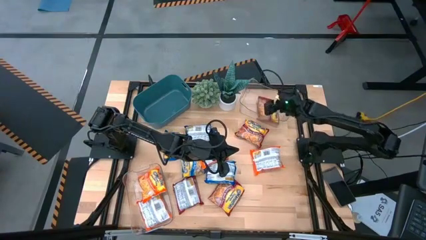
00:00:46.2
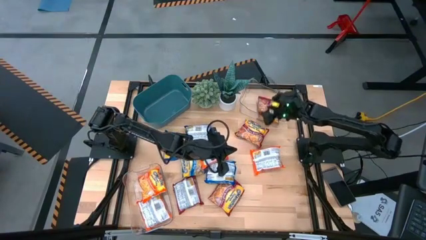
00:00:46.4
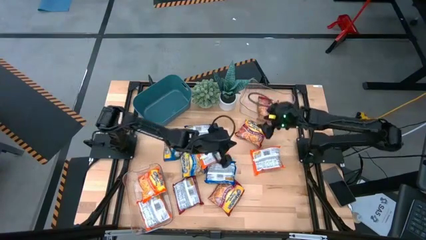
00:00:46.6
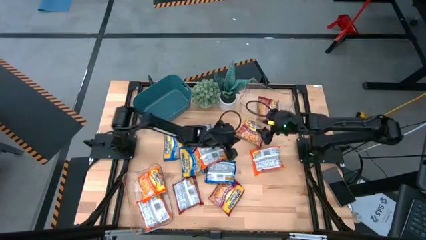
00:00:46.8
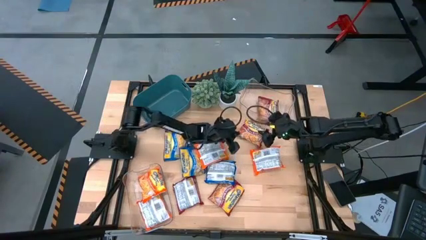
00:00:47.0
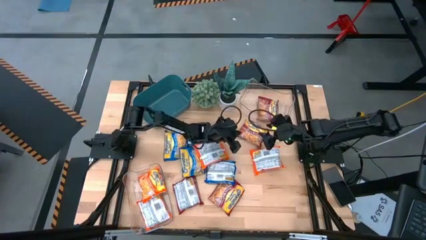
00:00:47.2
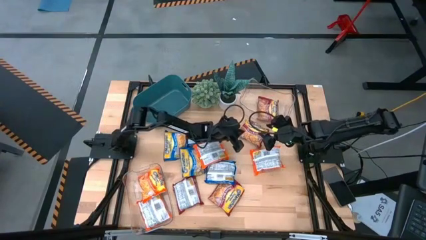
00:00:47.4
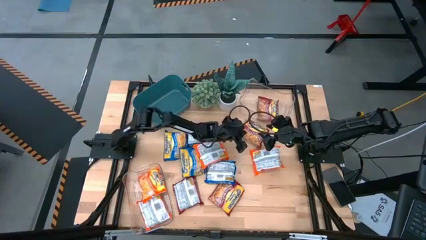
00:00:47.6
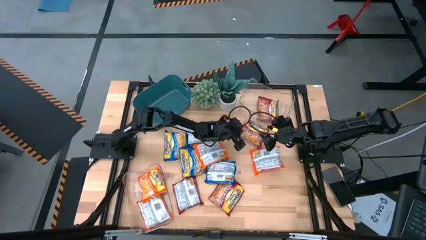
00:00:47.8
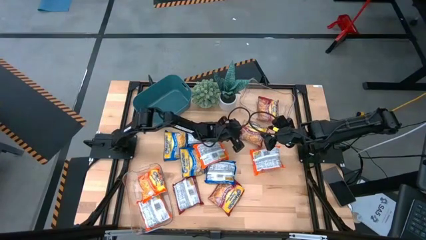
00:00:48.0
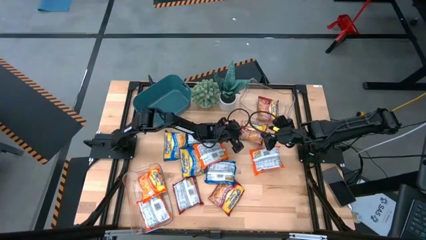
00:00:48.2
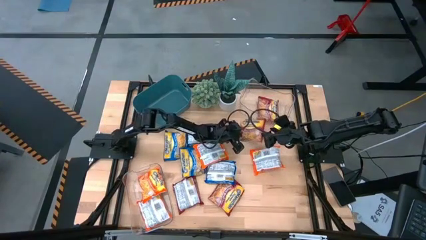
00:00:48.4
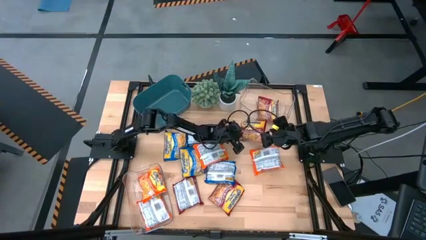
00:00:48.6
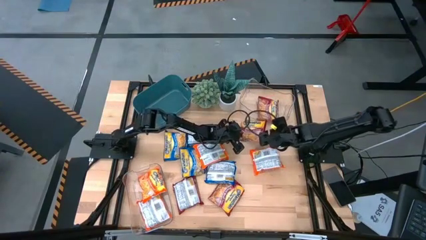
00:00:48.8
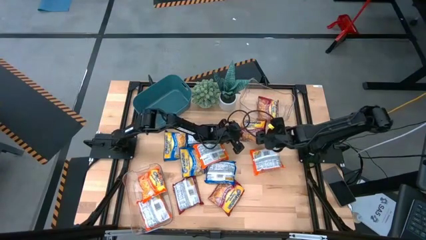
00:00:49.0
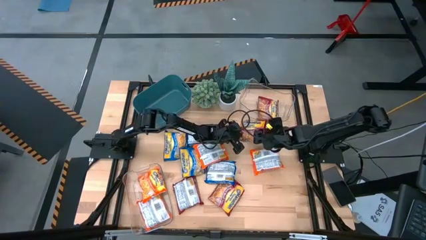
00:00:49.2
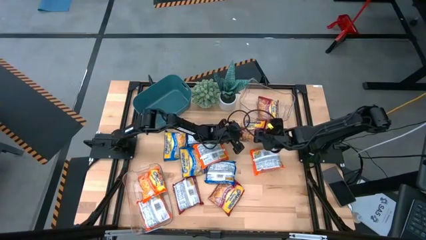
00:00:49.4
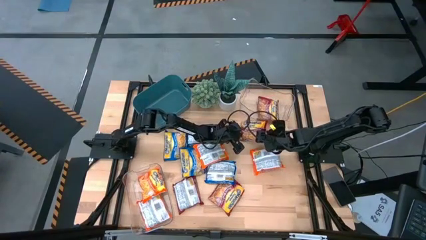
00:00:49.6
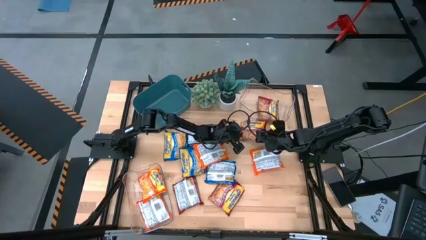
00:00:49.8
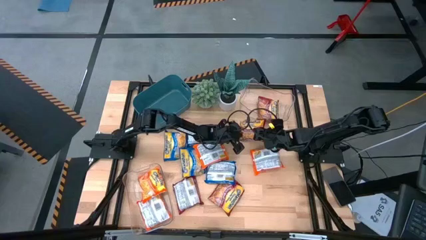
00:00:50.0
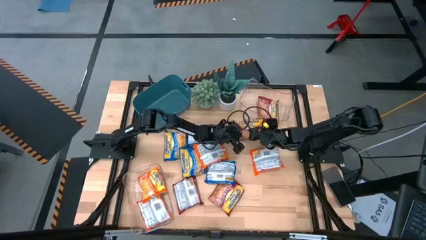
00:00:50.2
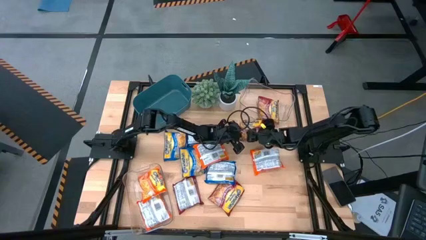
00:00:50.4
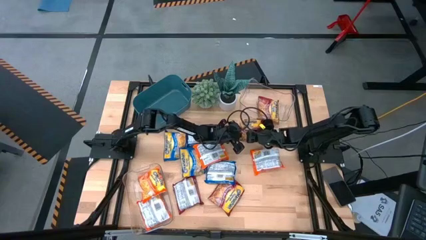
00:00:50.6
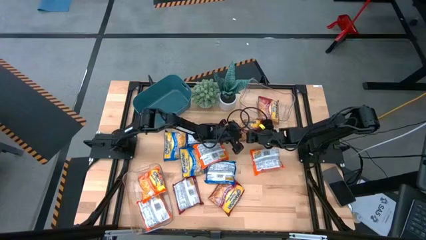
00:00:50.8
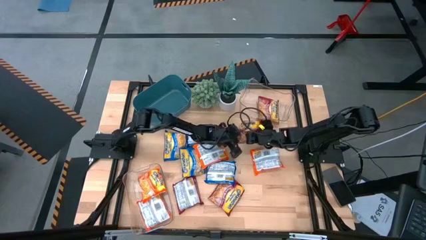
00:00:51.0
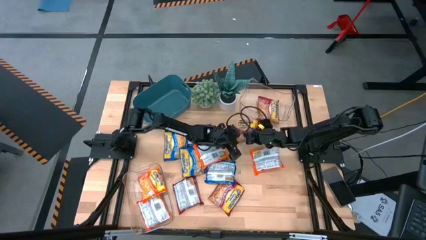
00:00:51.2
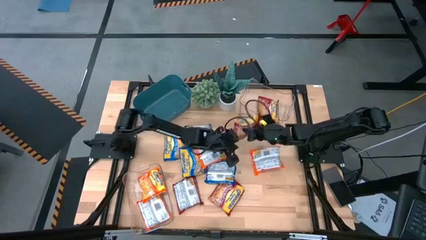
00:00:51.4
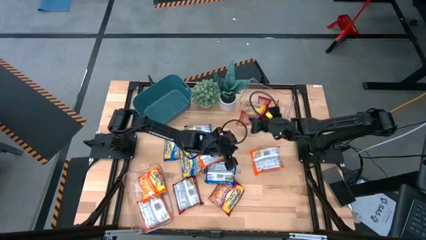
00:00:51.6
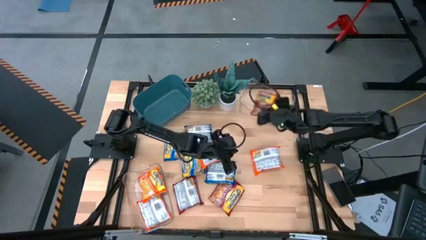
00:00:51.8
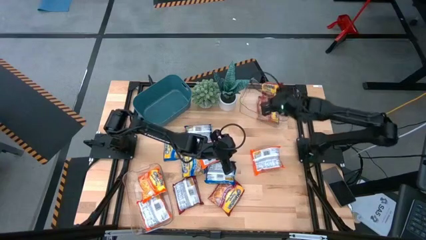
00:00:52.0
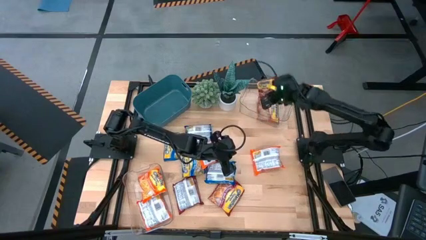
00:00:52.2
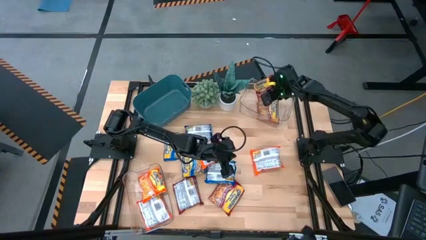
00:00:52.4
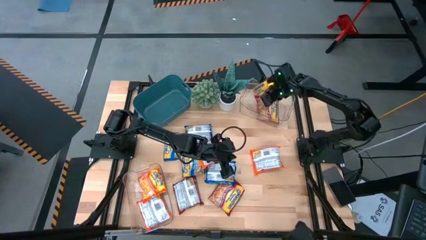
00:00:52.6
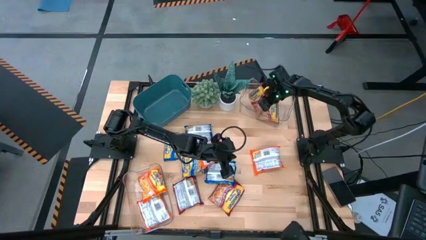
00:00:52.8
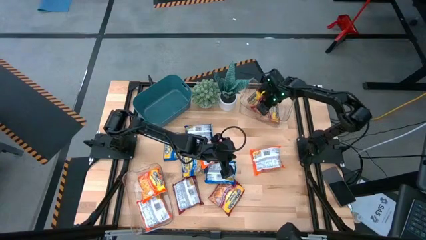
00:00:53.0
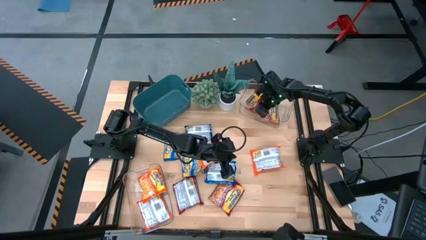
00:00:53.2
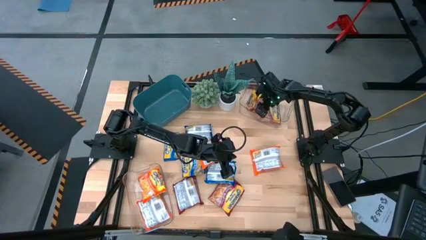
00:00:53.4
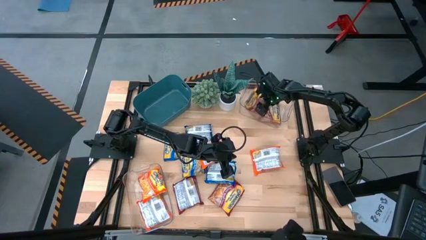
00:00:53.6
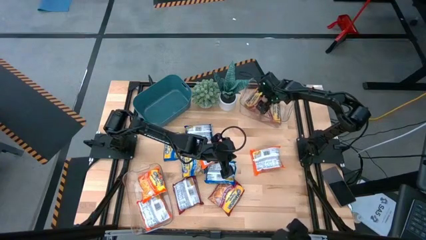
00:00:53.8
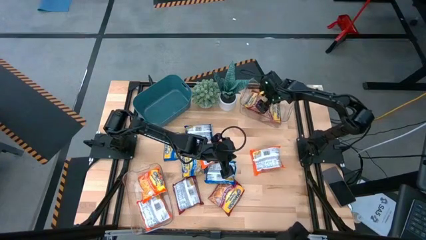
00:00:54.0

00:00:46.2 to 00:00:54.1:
Task: Sort Maruchan noodles
Put the red noodle pack into the top transparent bin

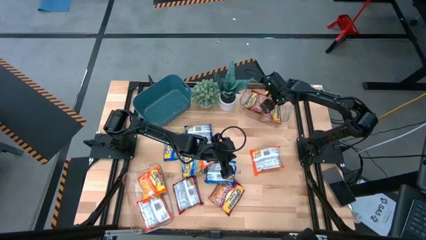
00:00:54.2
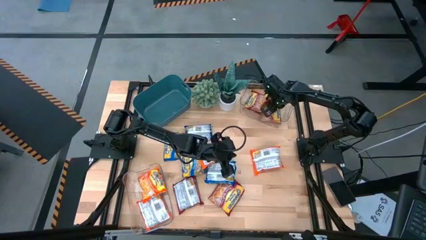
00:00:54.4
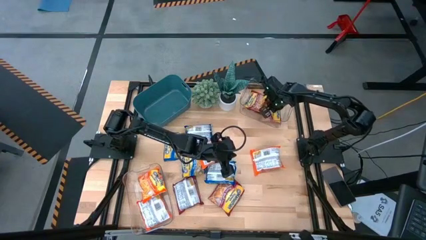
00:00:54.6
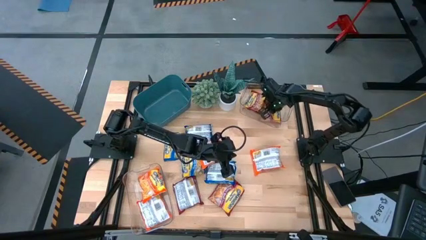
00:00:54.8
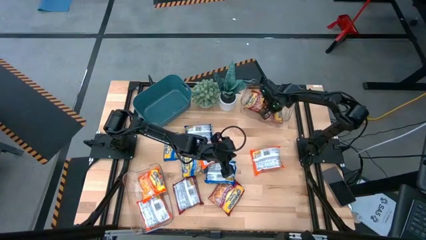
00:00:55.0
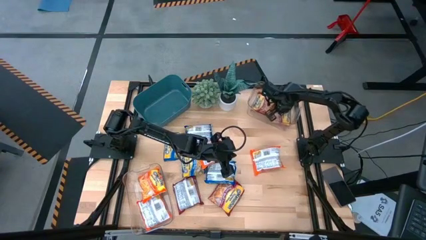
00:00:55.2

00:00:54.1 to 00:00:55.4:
Adjust the red noodle packs

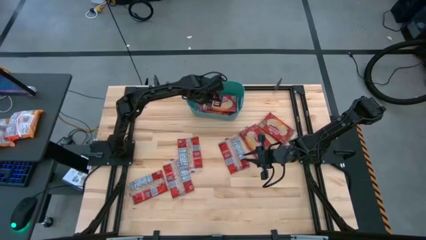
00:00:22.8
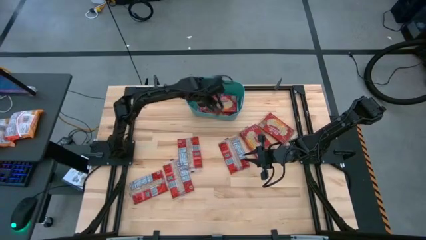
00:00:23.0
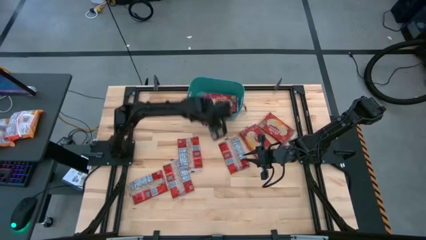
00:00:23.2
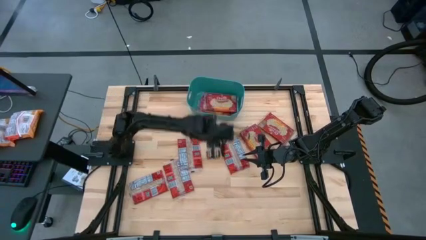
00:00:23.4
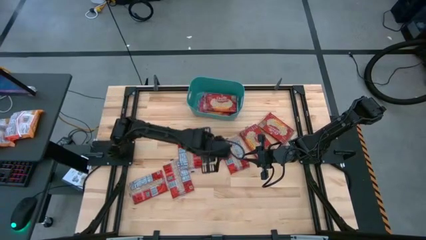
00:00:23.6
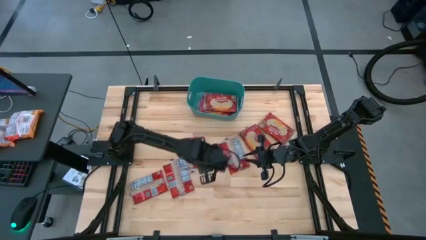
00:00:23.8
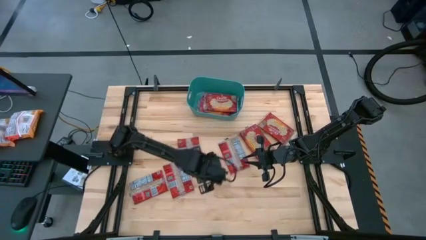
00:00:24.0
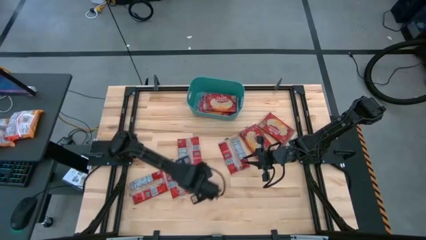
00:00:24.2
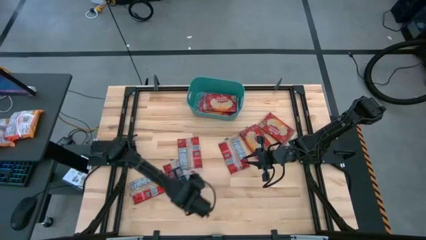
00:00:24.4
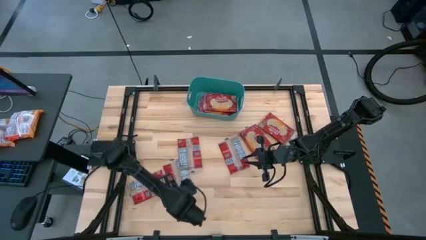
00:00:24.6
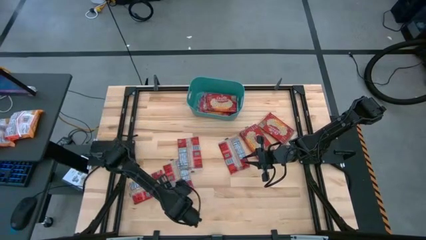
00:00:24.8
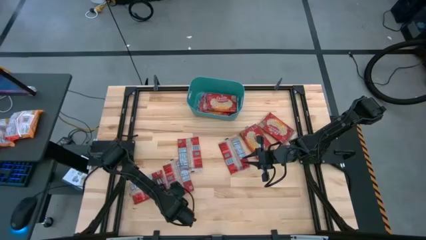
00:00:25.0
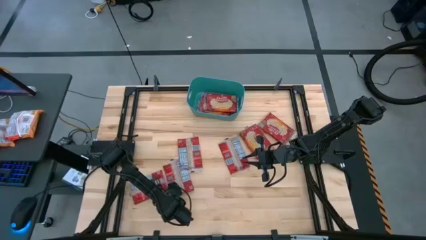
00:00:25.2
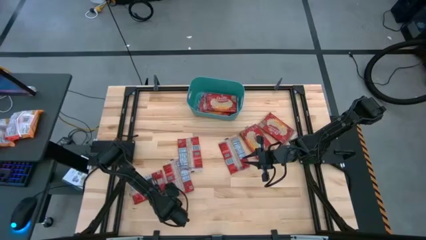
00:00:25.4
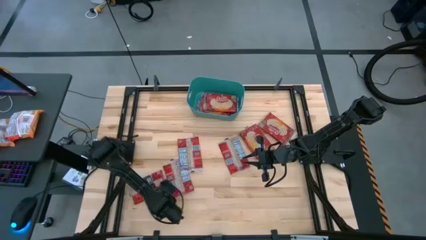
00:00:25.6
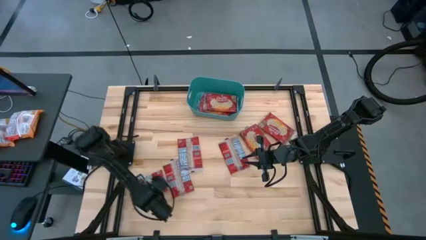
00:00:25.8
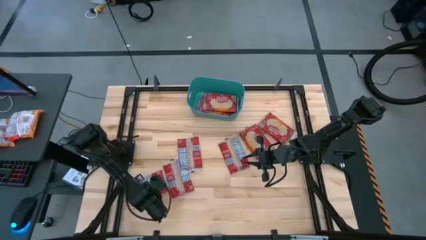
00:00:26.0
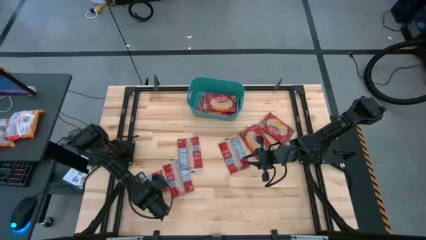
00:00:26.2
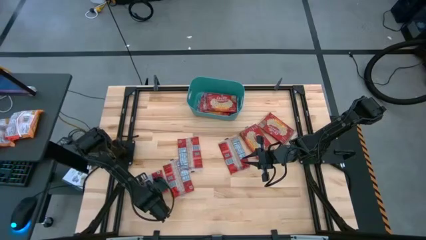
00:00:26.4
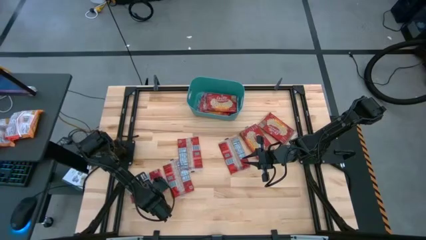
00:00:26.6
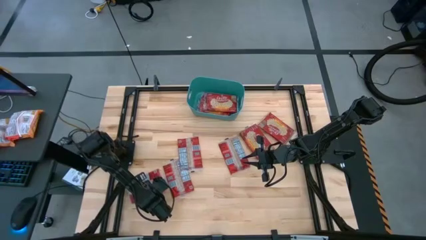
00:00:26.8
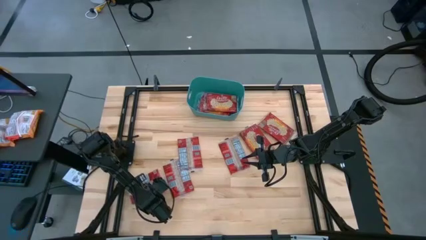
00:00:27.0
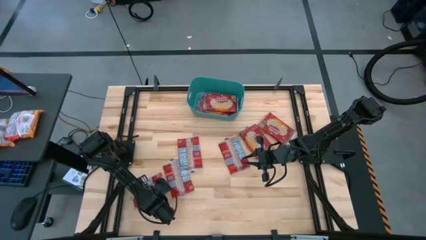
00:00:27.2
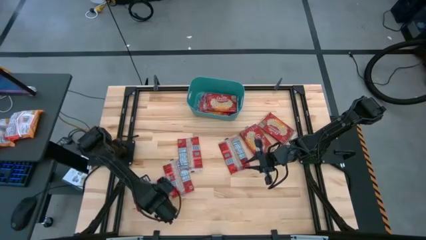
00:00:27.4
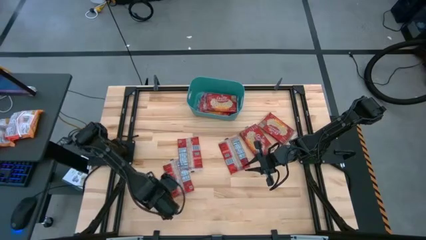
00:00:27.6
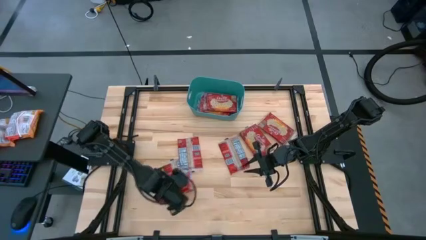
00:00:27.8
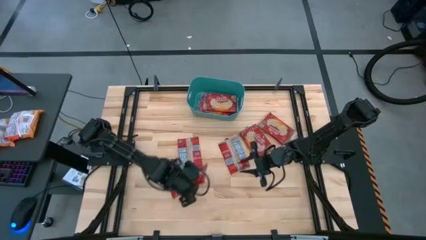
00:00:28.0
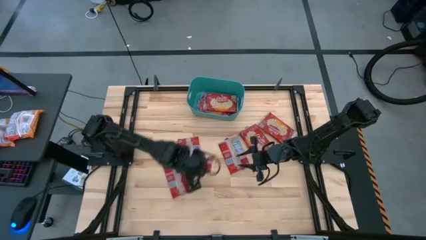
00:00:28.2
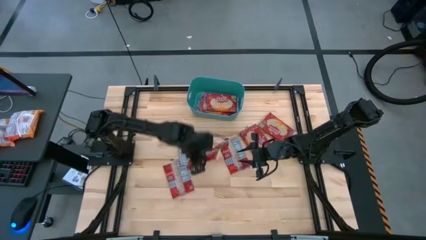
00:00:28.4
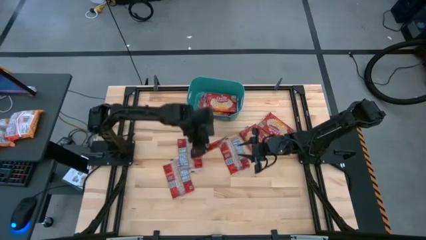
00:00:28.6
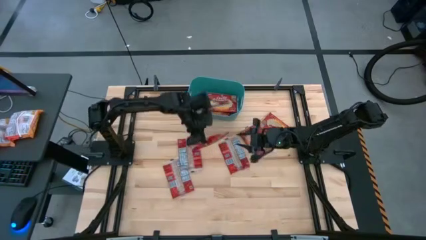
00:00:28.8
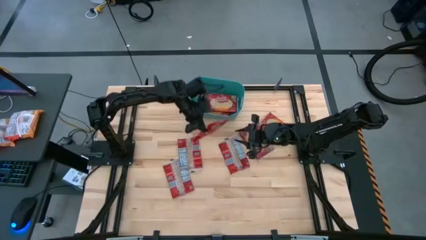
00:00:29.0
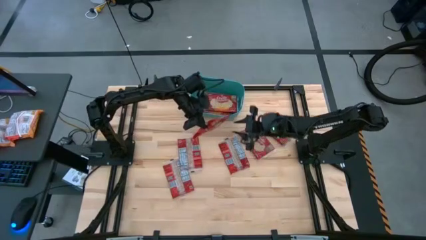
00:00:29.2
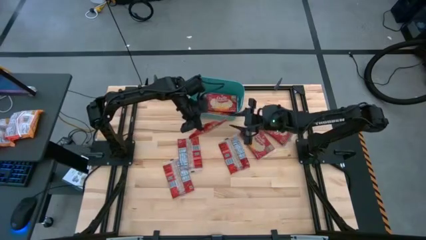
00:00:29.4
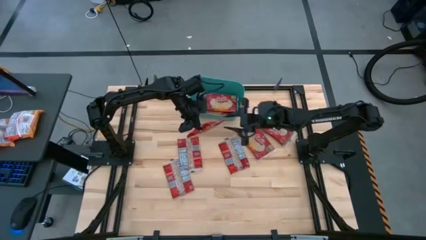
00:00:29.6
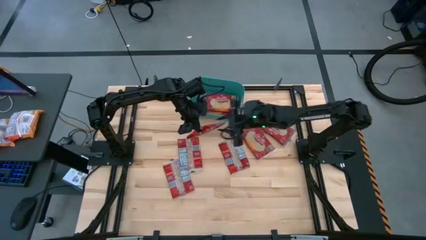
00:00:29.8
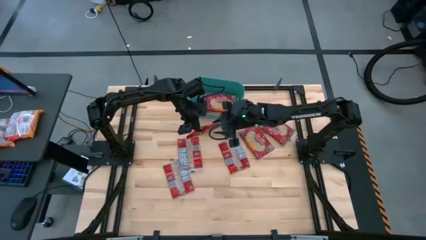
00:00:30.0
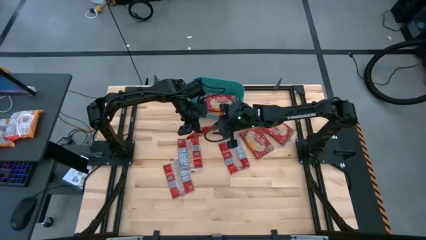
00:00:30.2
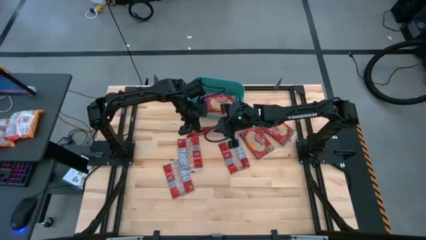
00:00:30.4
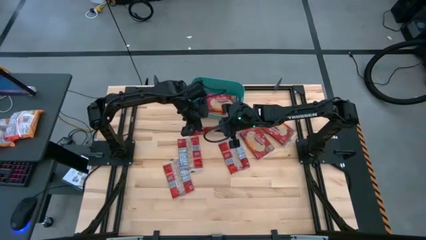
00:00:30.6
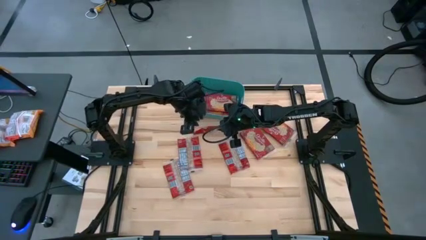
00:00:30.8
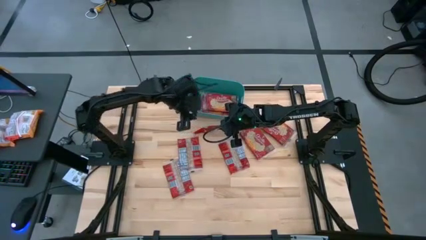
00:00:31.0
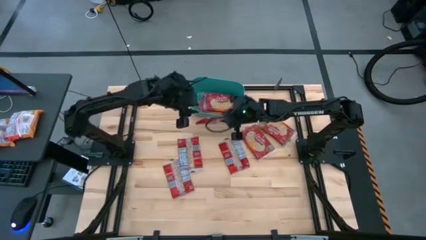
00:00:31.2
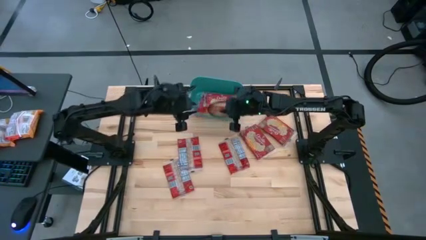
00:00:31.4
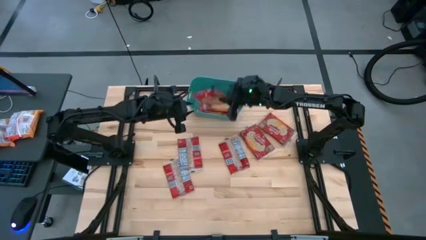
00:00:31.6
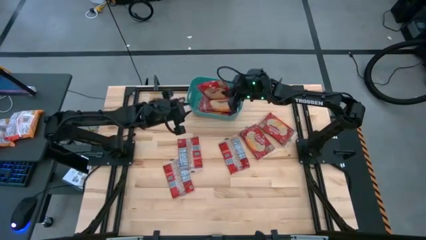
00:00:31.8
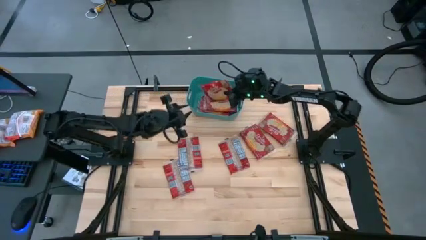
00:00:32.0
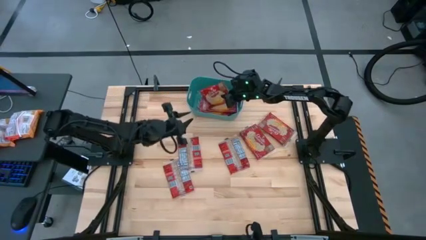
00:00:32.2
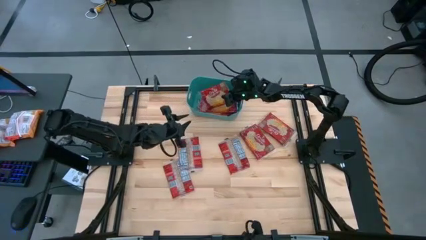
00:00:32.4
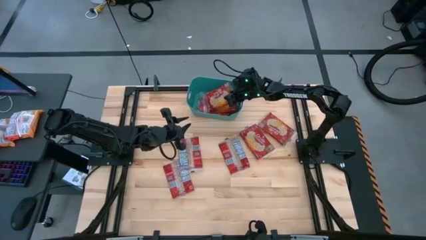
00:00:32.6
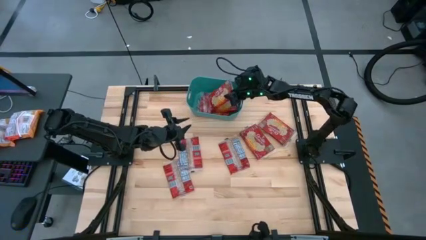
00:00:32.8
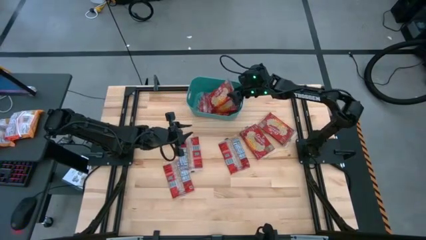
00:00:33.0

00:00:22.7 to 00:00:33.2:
Task: Sort popcorn bags into baskets
Put the red popcorn bag into the green bin
